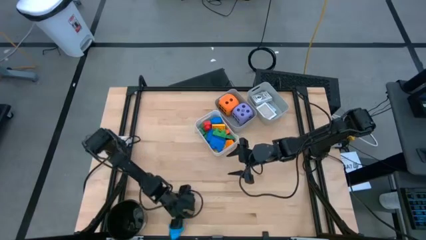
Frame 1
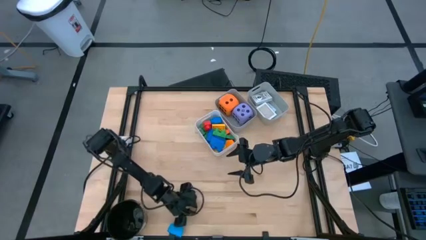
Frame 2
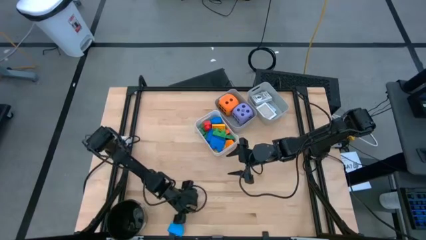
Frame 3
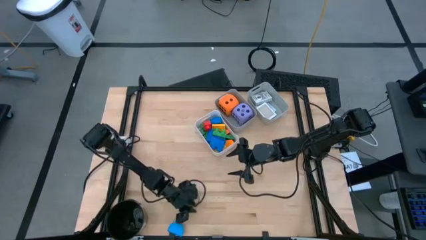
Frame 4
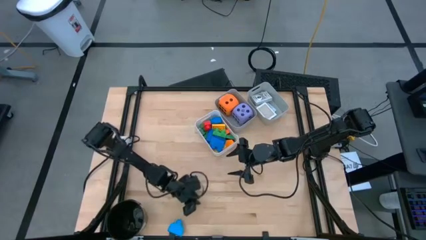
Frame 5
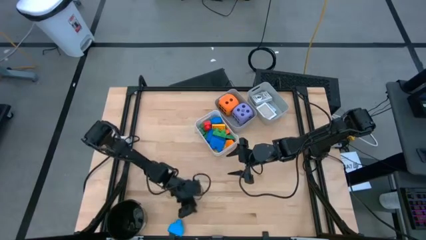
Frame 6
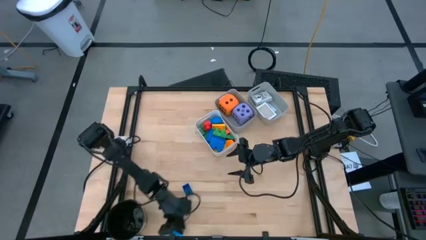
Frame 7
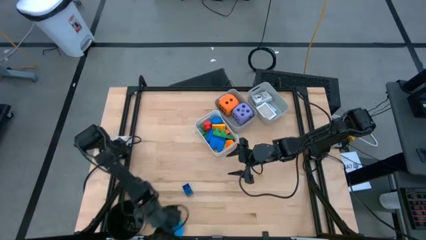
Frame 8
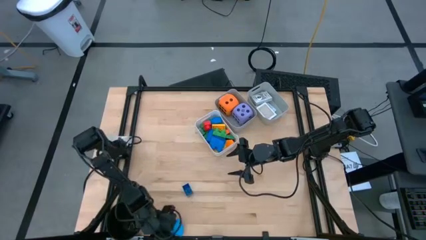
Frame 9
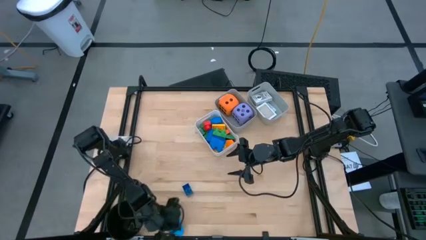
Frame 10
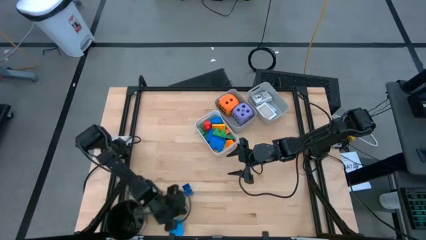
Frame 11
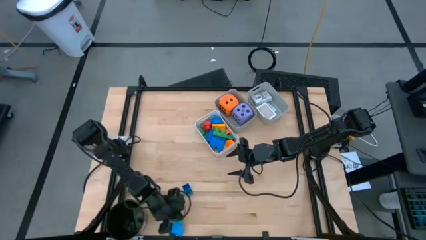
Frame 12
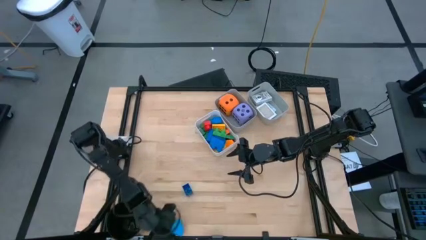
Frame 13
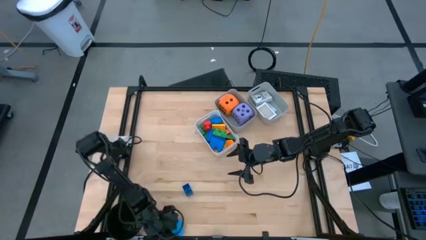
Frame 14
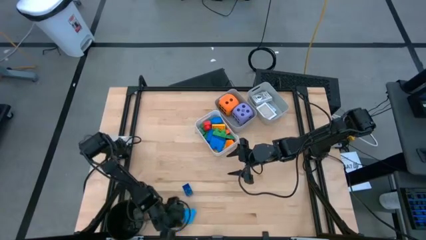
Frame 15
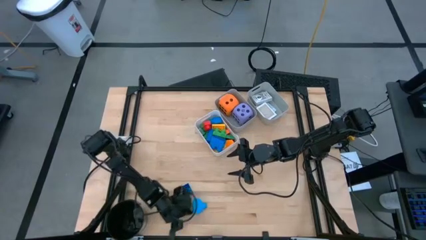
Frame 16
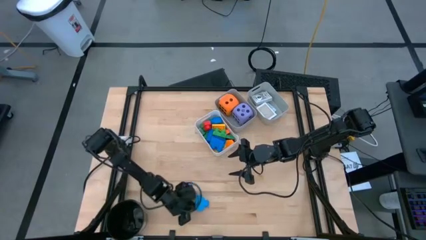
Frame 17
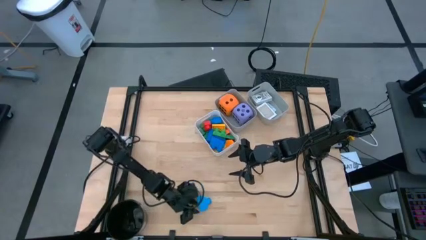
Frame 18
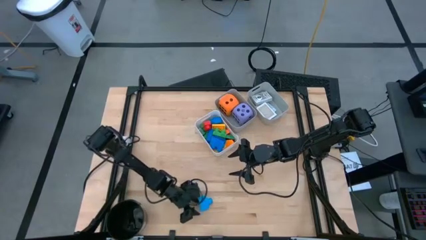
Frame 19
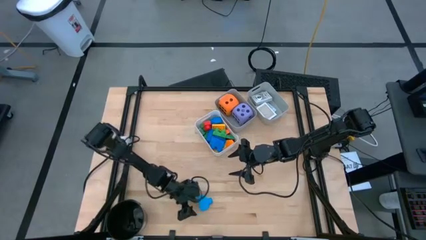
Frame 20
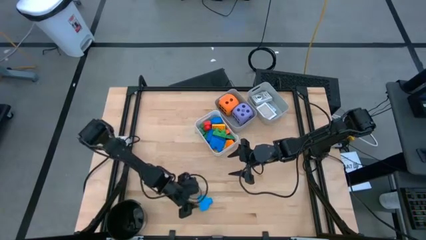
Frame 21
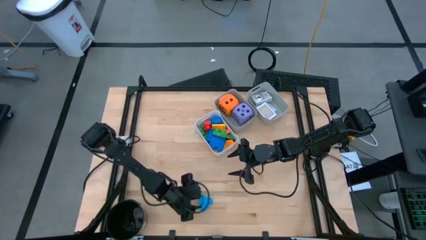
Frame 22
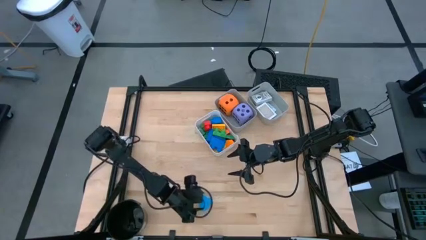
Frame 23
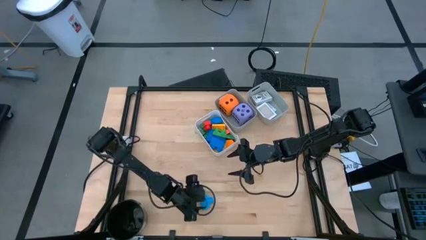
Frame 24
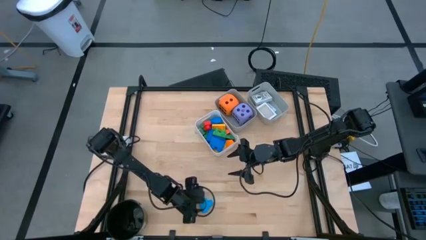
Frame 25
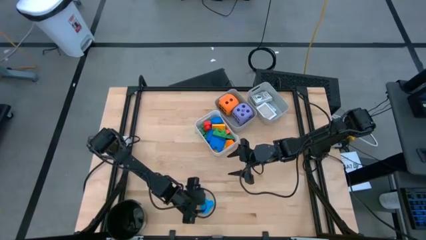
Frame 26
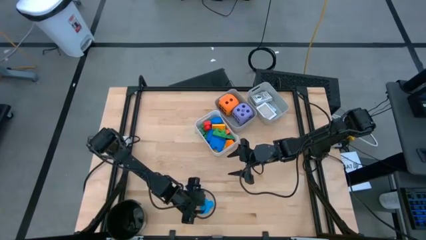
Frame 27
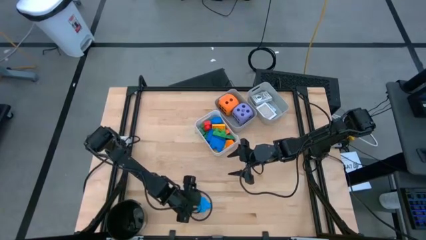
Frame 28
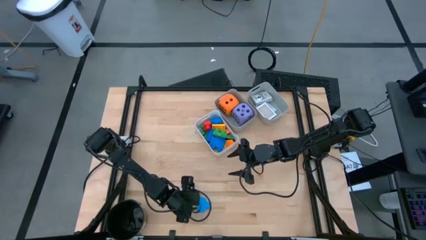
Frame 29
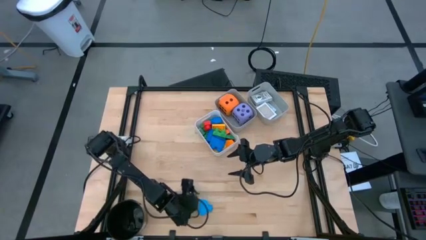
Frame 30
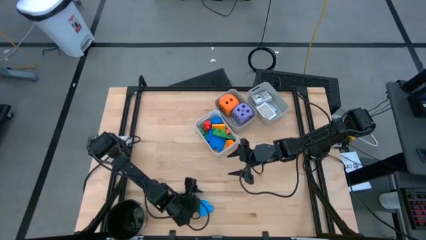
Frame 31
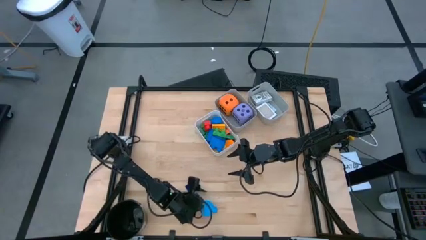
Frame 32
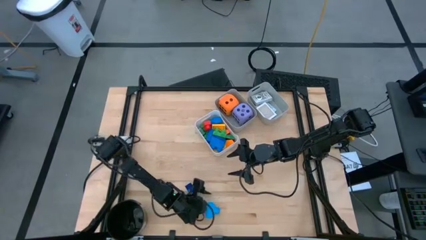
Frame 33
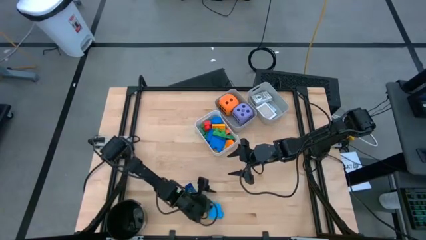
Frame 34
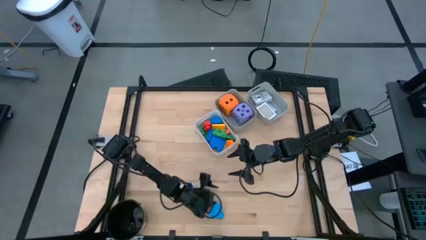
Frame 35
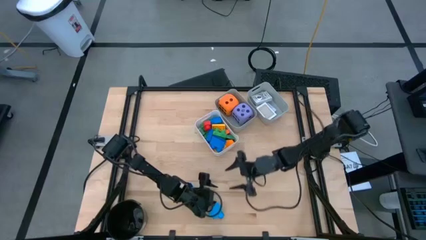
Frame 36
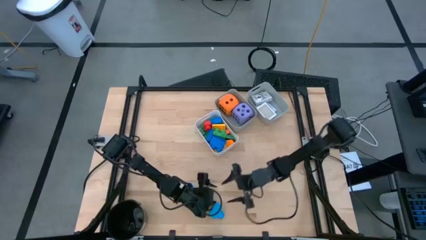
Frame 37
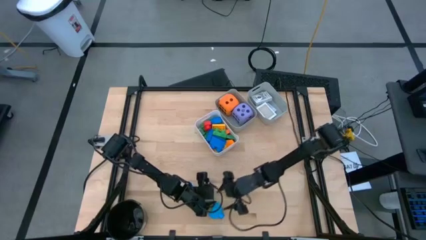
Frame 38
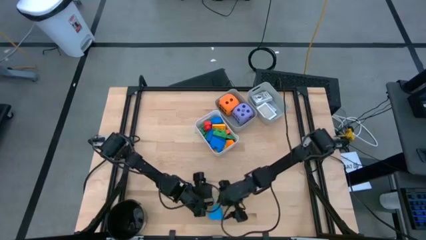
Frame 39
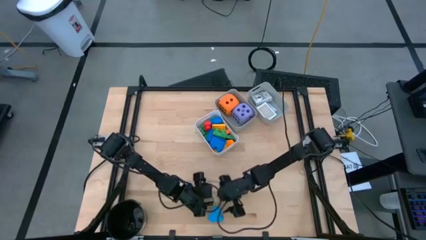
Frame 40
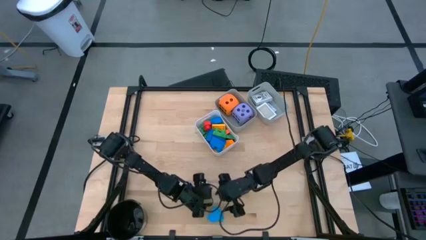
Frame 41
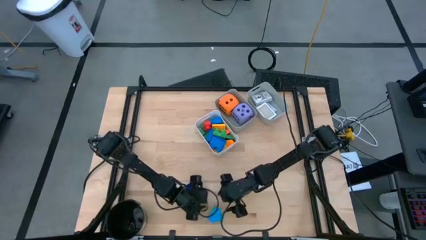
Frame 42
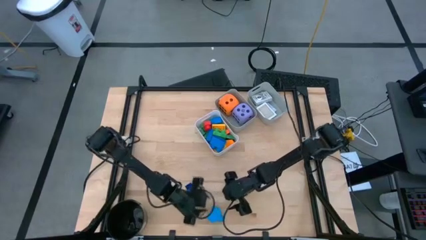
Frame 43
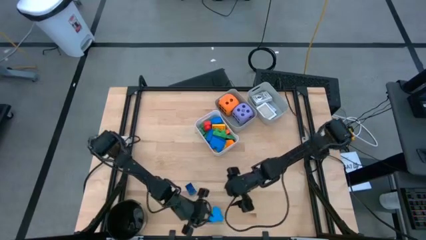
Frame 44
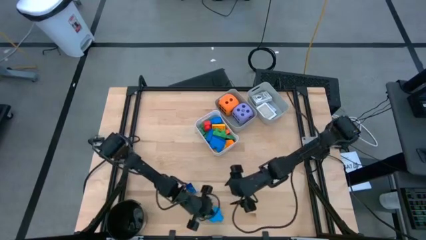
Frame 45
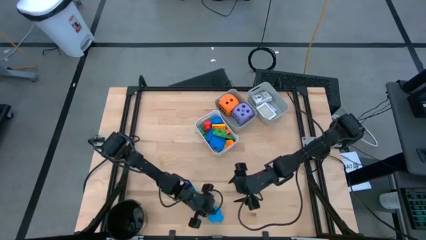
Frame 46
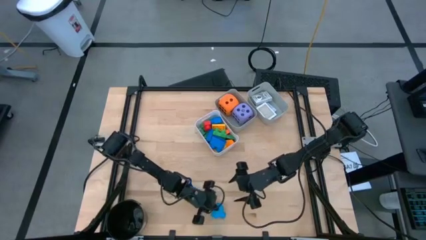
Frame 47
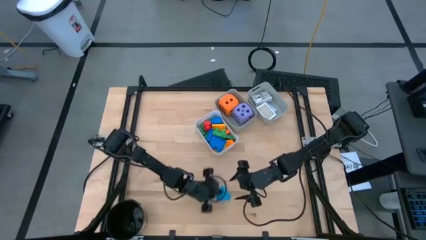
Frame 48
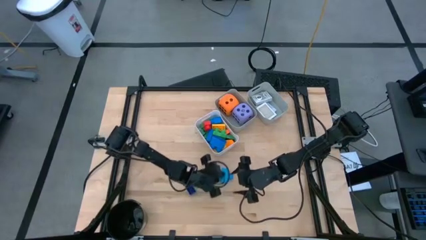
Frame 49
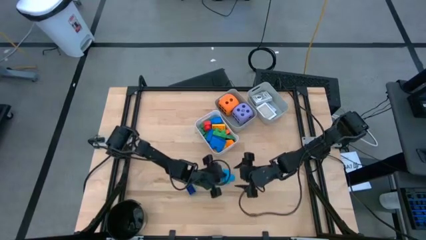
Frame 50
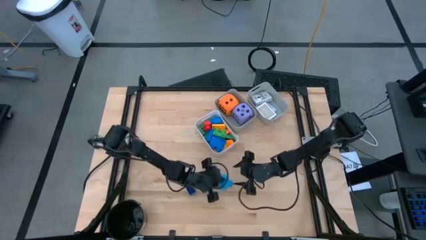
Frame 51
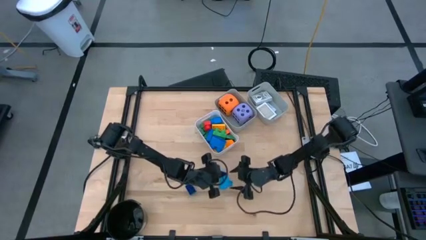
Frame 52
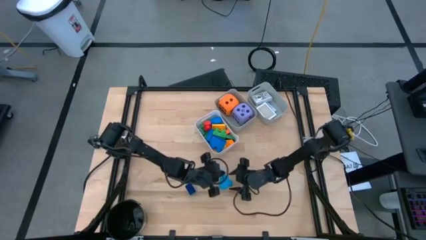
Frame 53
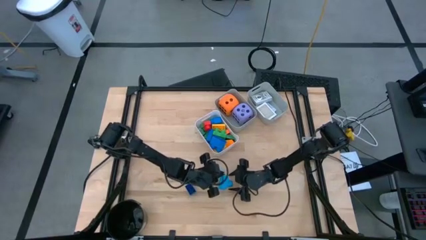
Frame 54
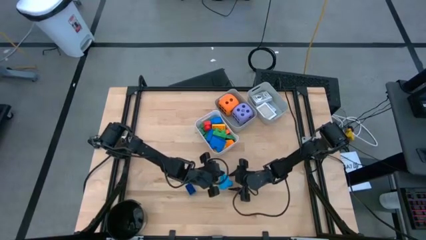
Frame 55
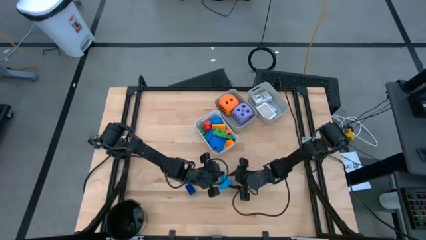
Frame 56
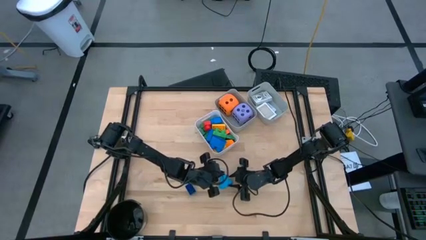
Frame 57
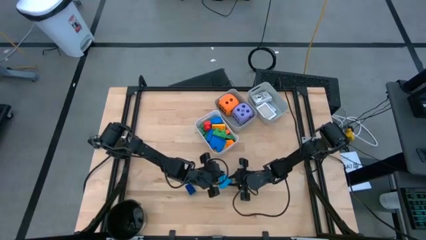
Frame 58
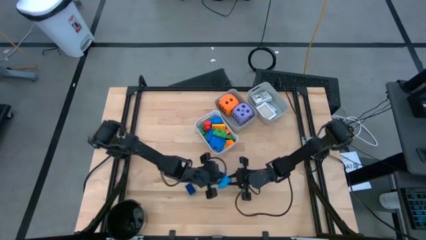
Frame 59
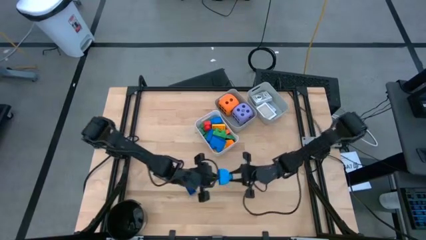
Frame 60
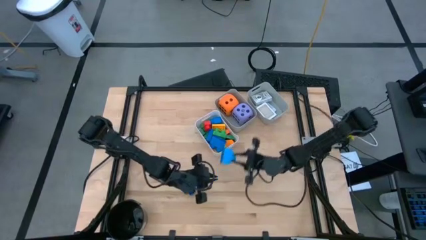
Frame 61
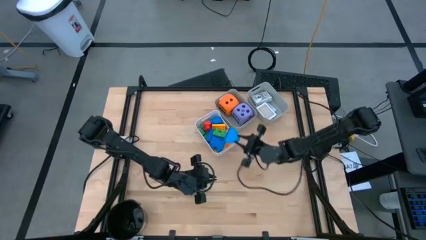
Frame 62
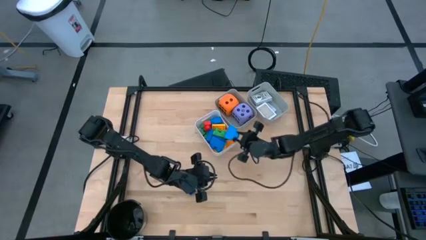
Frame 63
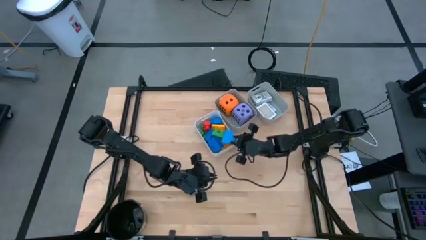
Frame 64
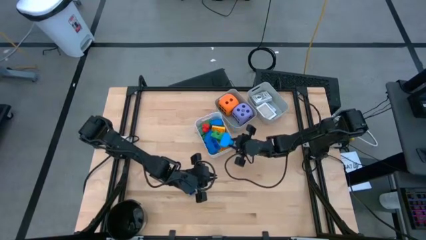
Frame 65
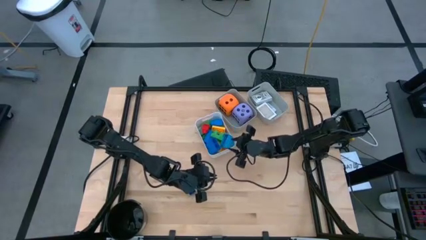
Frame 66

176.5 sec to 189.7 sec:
Task: Pick & Place Toys
Put the light blue game piece into the white bin

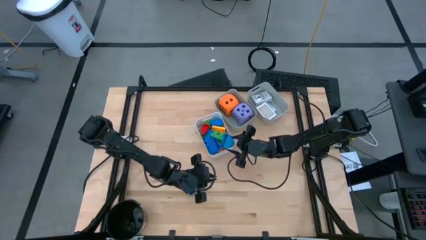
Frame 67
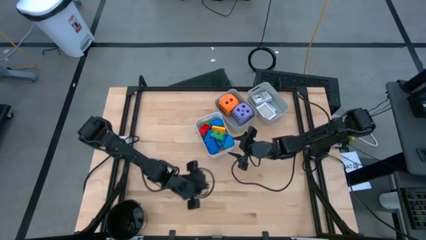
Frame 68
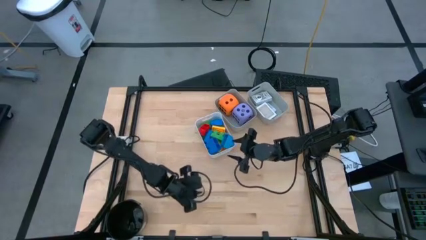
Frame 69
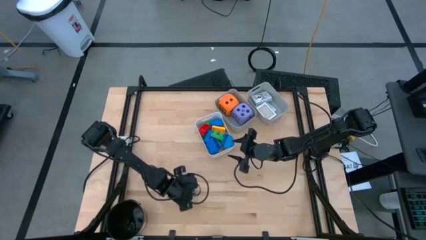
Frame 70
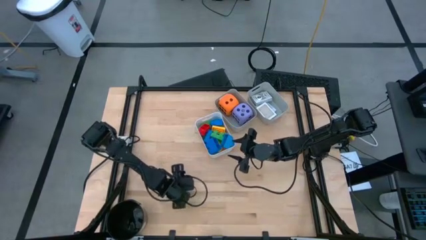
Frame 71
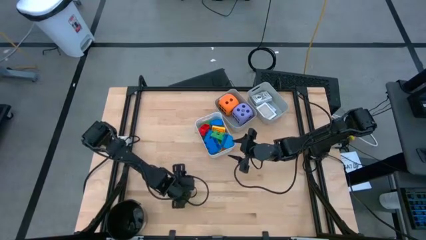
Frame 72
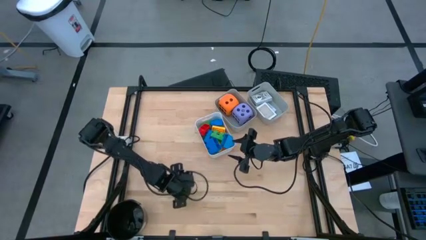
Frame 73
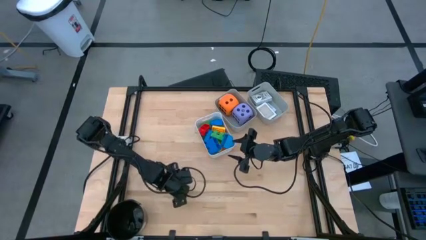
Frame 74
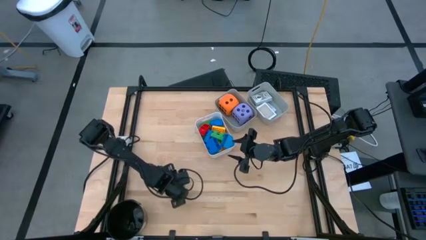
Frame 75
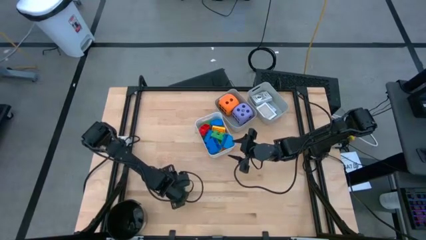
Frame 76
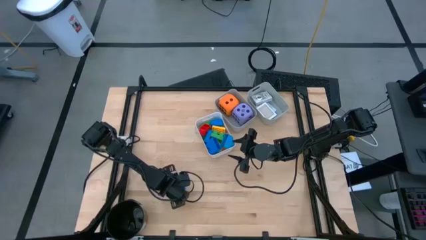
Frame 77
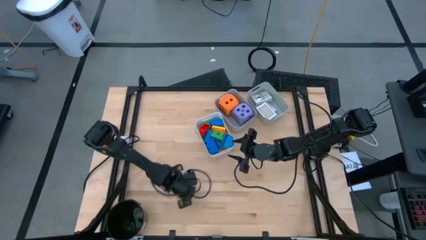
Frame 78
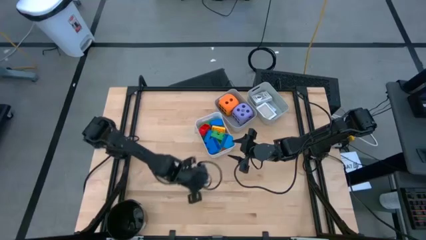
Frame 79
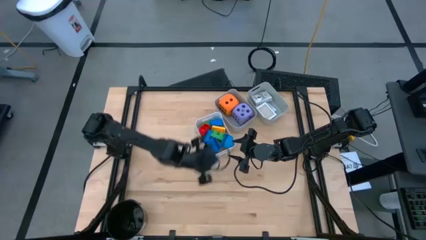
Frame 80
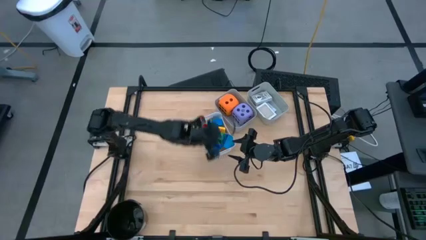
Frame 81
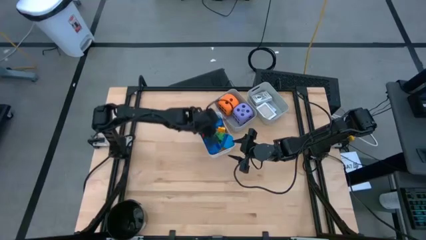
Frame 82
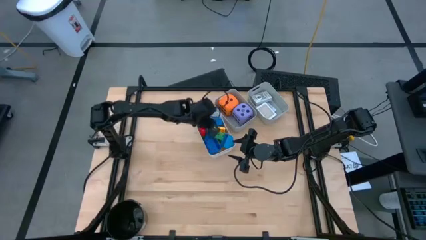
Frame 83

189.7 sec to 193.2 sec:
Put the blue game piece into the white bin
